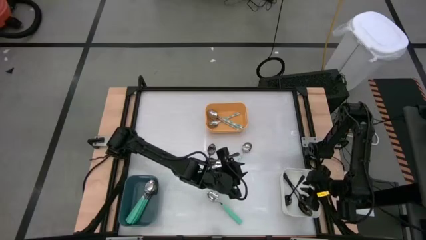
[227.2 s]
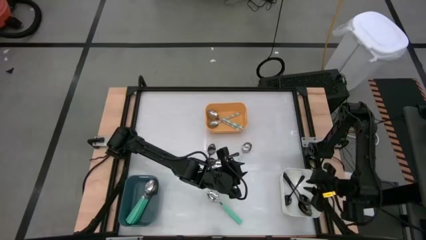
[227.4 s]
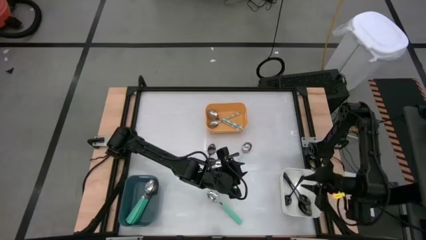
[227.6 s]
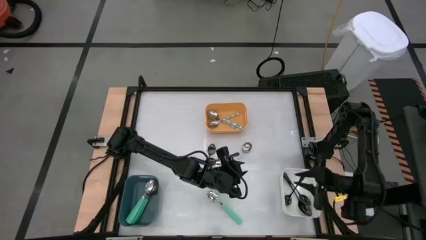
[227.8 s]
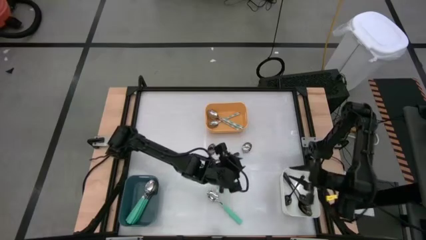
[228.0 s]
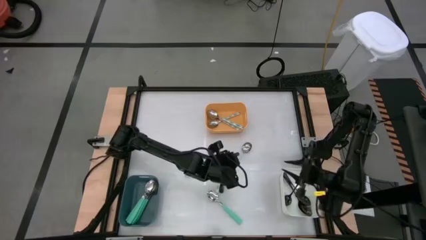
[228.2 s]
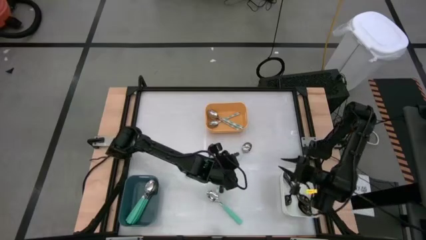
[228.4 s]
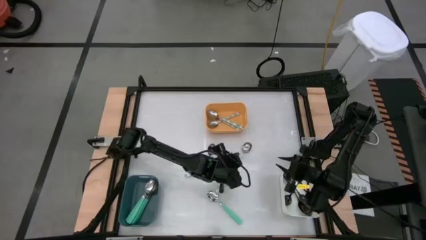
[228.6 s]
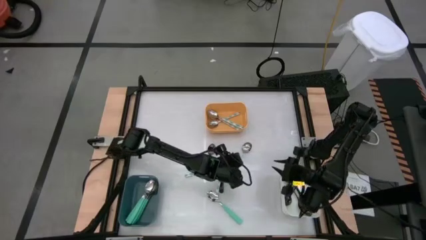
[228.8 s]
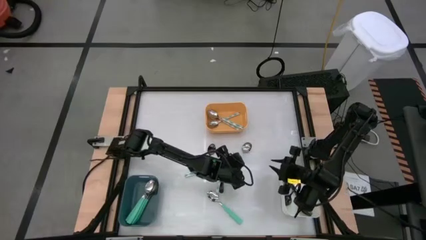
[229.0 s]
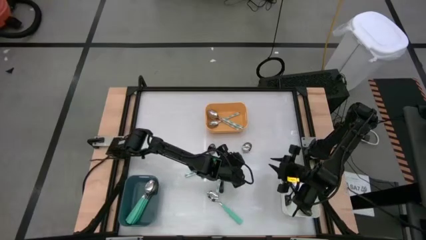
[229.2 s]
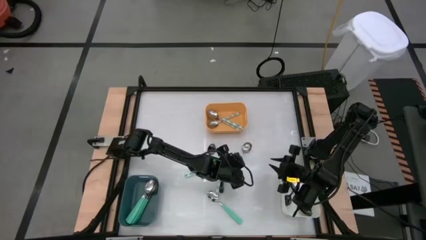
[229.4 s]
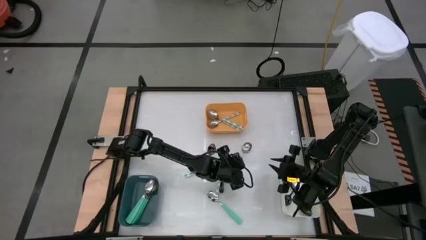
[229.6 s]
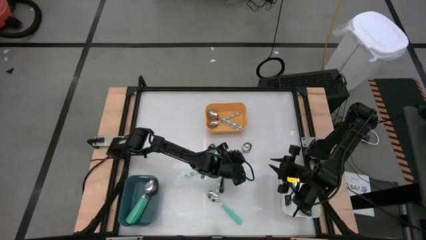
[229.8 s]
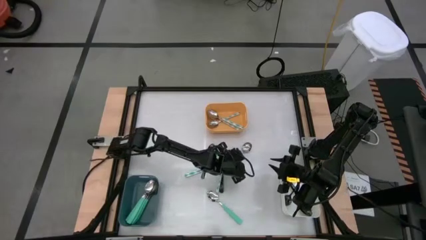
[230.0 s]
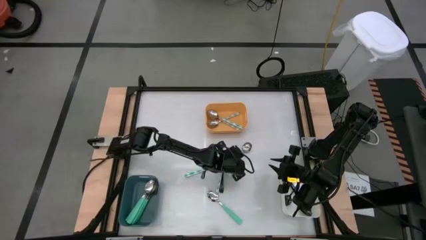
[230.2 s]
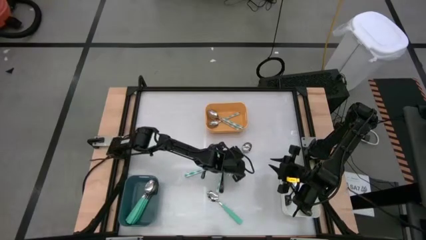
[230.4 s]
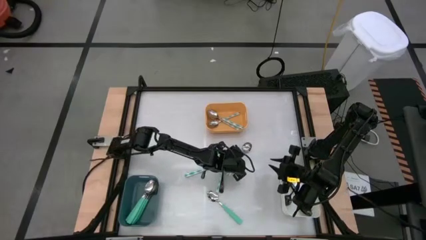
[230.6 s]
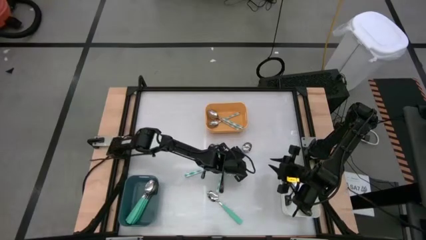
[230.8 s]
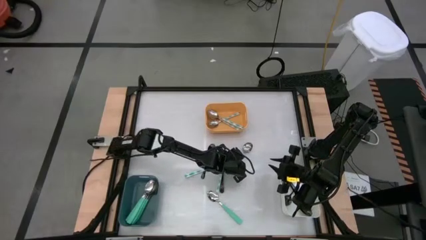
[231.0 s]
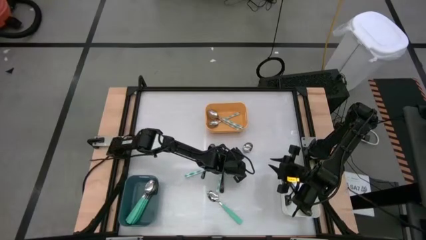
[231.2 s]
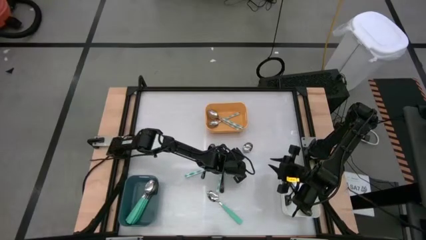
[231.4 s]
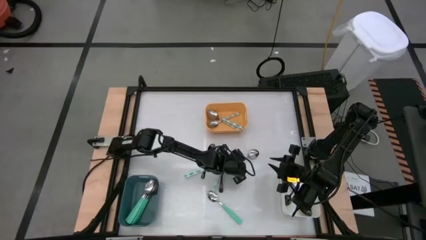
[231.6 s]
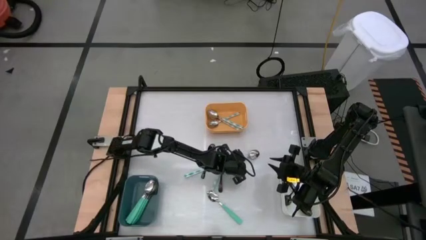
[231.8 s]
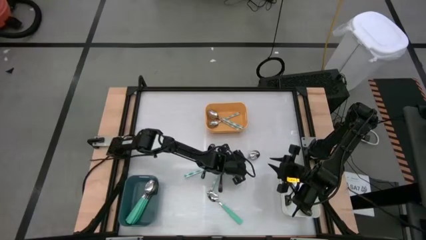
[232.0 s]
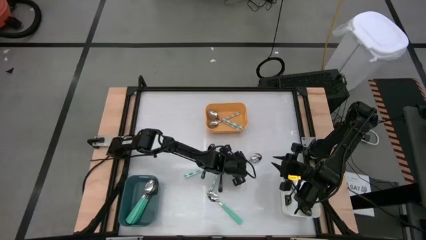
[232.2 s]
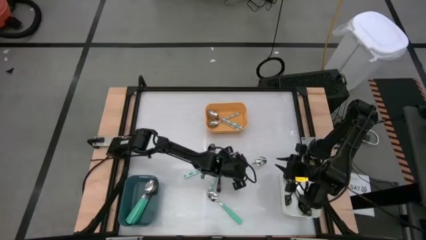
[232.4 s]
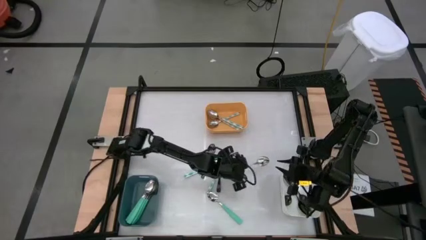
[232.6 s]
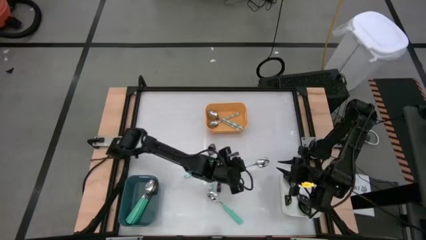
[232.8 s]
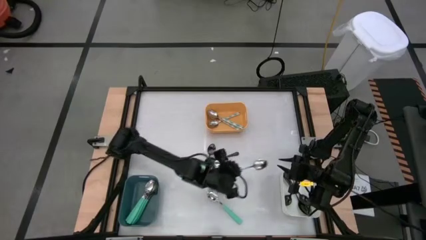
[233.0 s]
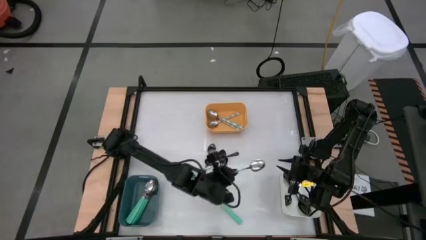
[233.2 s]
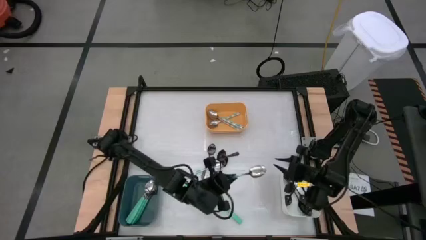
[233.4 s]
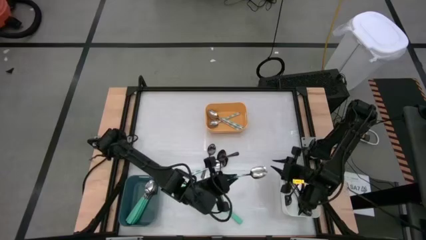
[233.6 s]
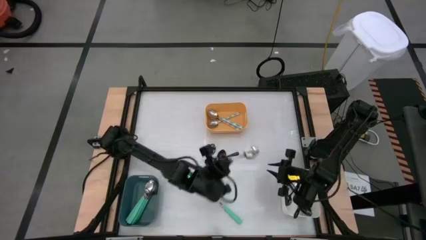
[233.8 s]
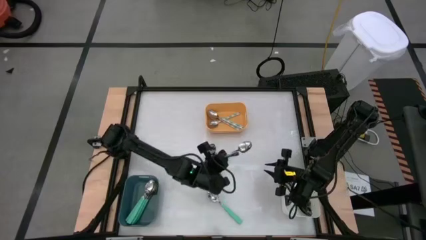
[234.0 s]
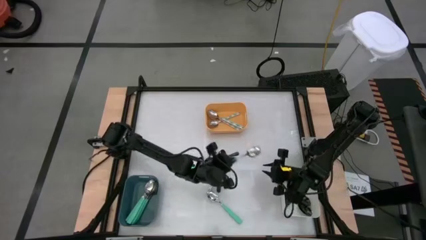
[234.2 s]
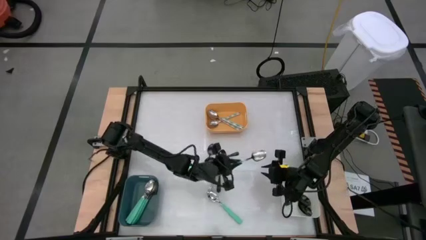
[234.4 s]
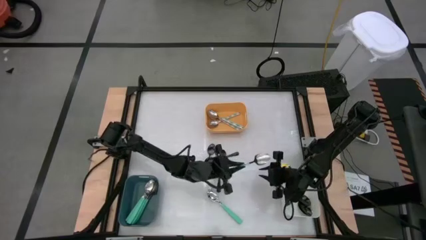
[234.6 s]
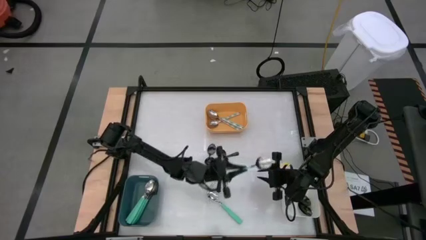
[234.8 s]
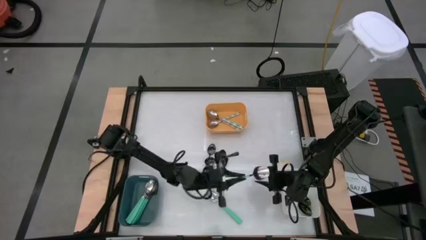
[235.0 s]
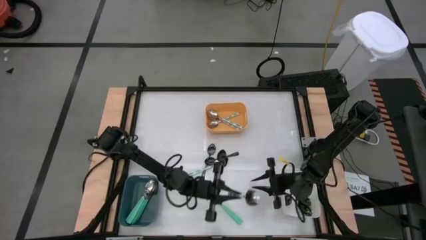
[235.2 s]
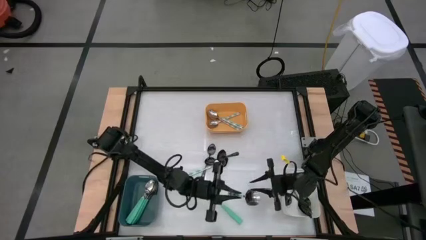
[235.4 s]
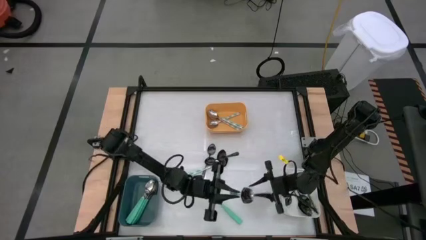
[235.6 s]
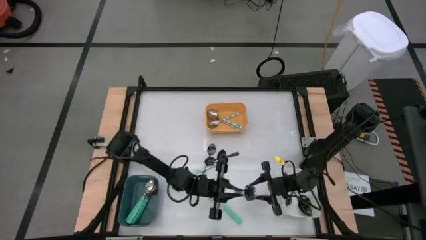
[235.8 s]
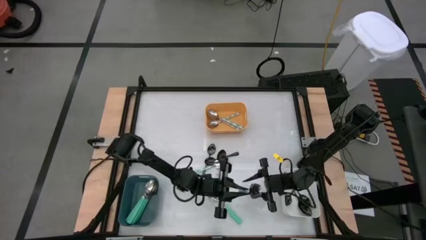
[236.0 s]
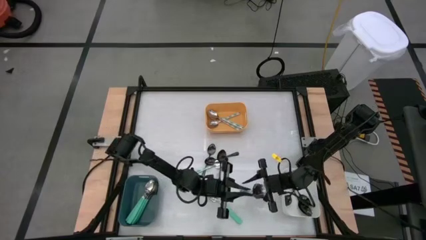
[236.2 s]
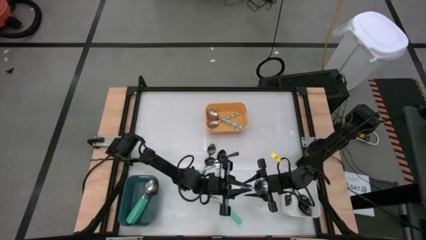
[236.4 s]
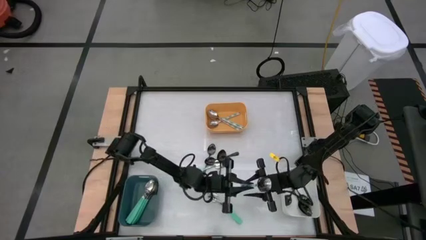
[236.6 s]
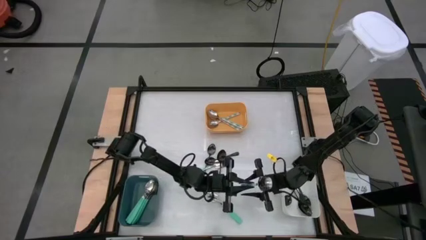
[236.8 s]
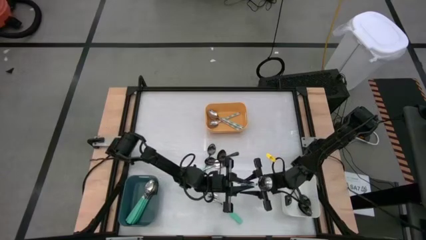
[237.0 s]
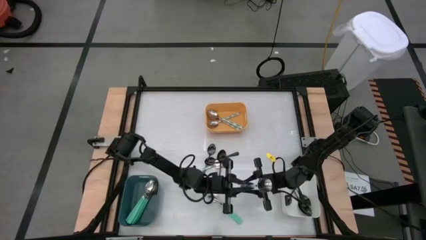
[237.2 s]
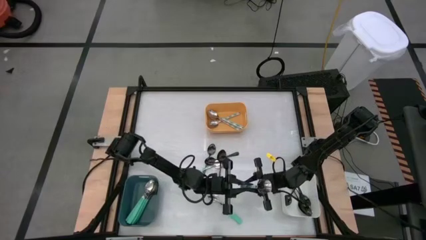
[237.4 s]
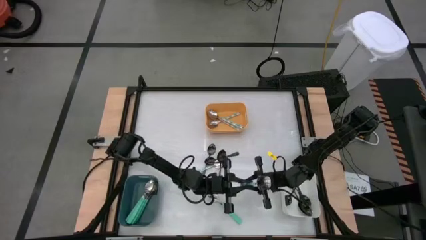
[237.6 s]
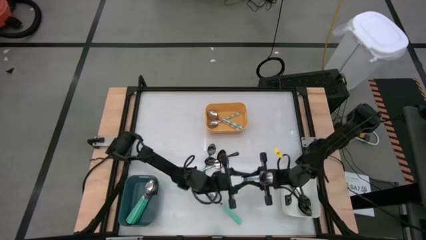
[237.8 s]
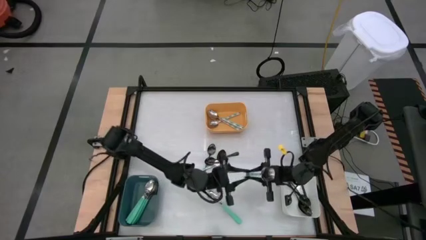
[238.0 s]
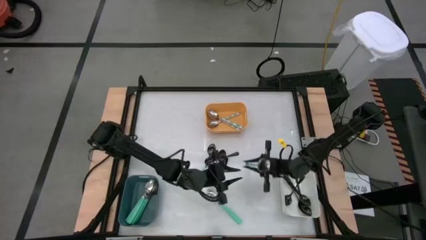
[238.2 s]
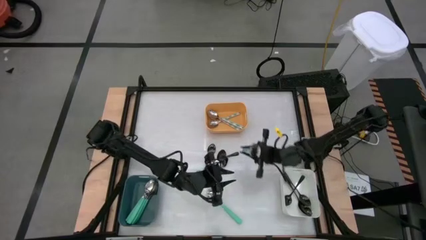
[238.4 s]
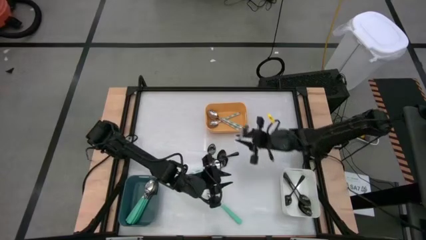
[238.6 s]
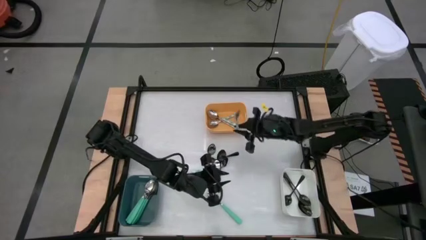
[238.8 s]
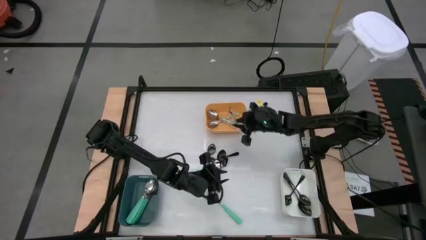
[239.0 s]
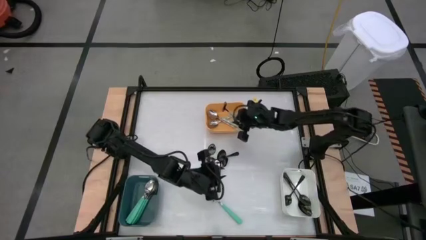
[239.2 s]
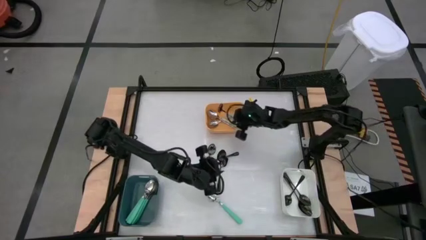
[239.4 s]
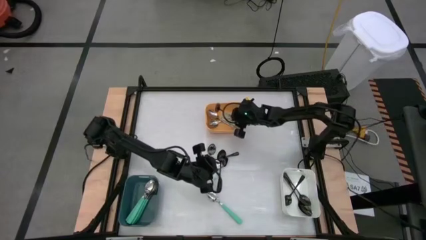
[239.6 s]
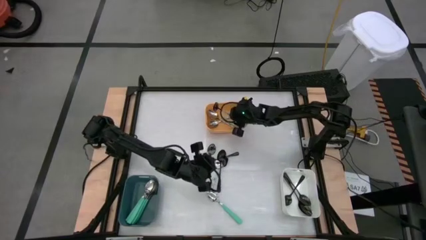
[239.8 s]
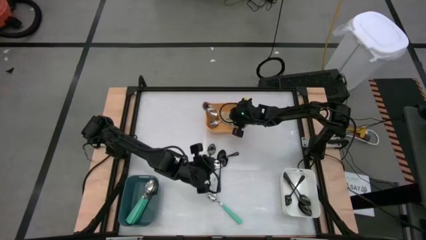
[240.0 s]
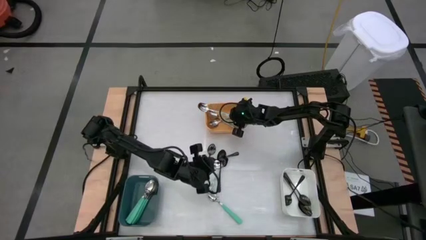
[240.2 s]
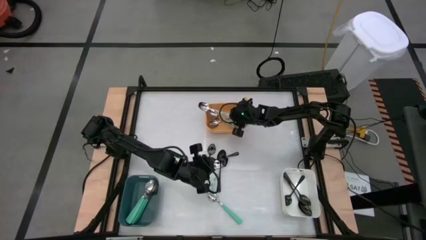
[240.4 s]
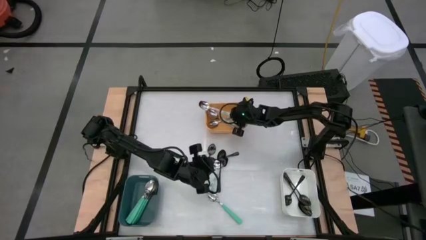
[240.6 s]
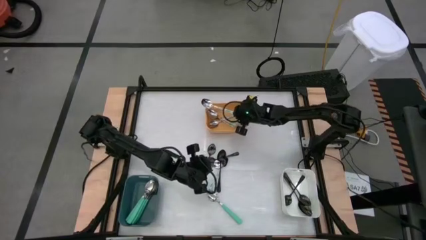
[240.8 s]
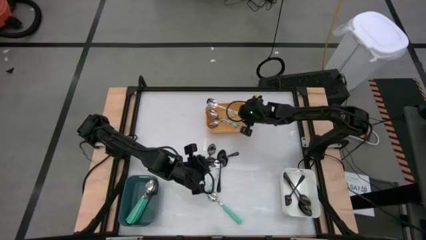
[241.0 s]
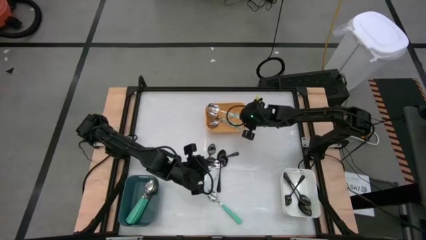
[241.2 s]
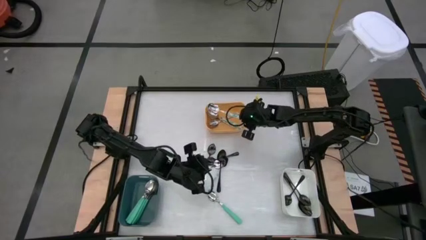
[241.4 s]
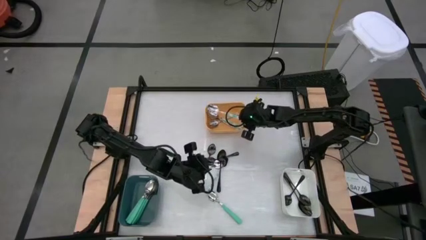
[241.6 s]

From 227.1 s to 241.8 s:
Task: Sort silverware by color (type)
Put the white patterned spoon into the yellow bin

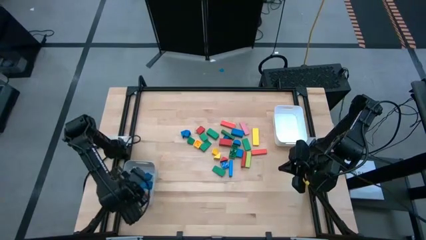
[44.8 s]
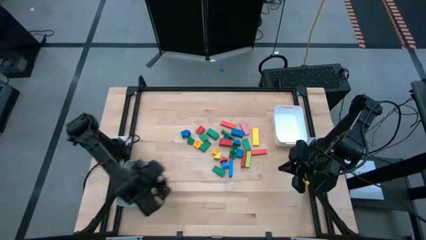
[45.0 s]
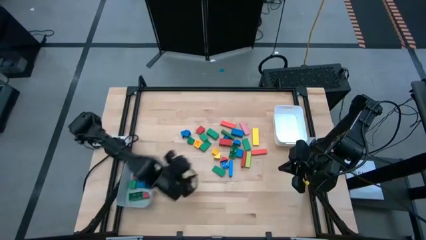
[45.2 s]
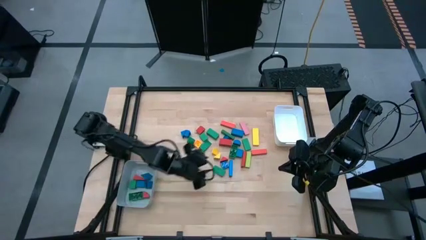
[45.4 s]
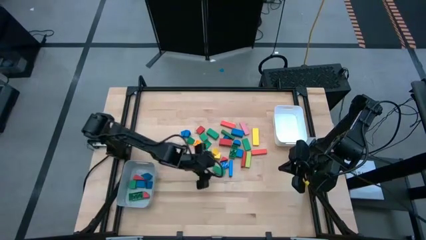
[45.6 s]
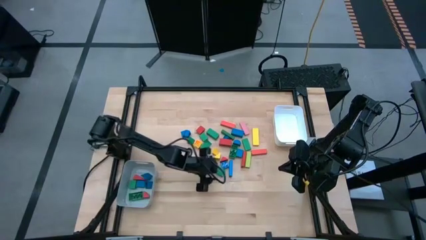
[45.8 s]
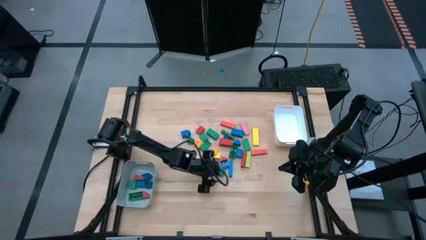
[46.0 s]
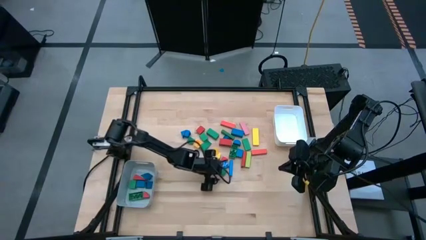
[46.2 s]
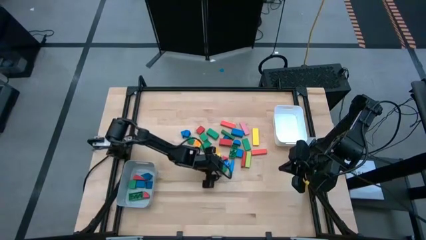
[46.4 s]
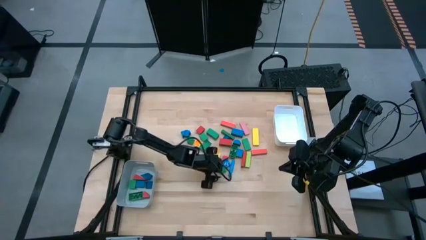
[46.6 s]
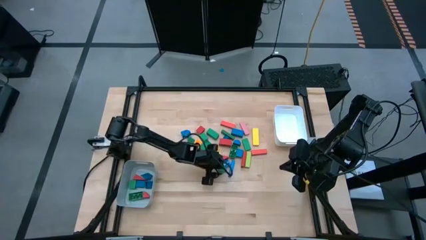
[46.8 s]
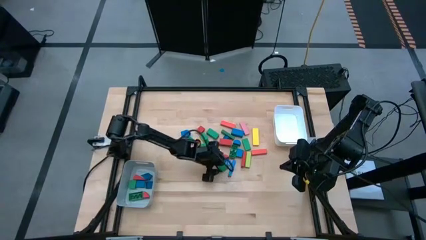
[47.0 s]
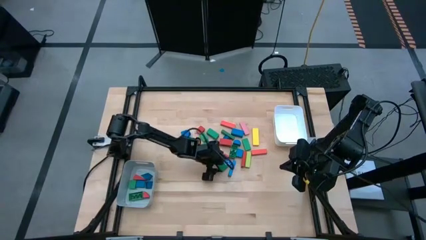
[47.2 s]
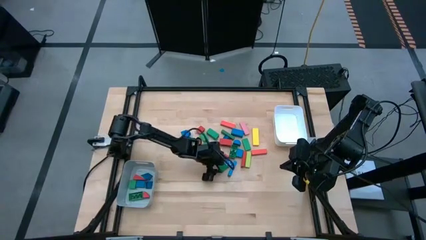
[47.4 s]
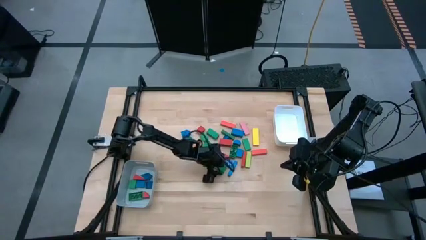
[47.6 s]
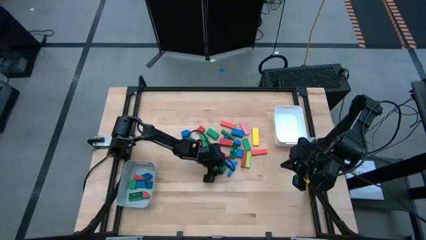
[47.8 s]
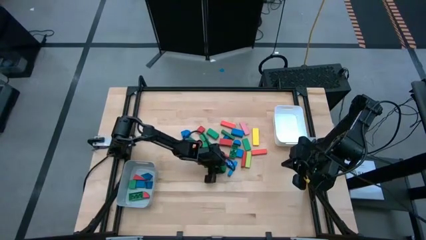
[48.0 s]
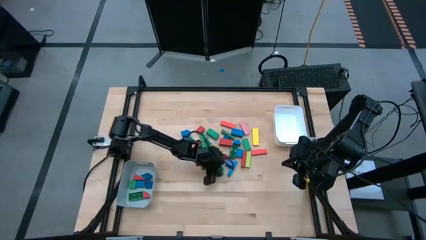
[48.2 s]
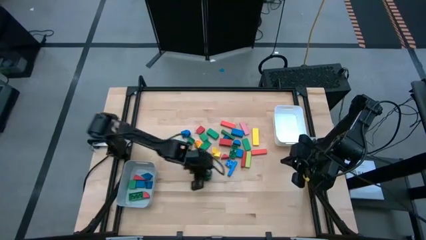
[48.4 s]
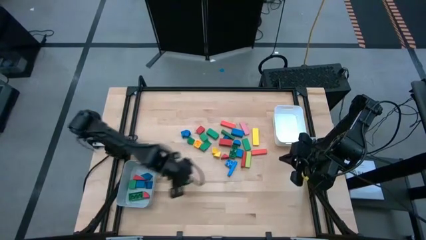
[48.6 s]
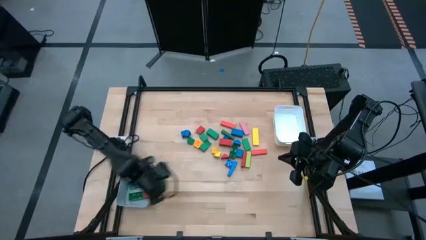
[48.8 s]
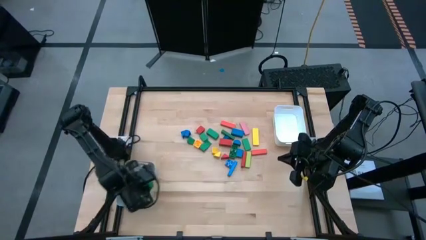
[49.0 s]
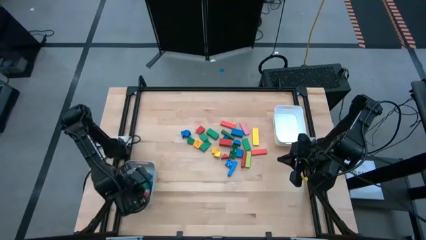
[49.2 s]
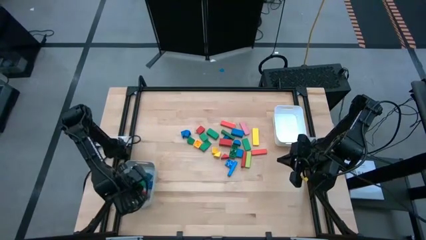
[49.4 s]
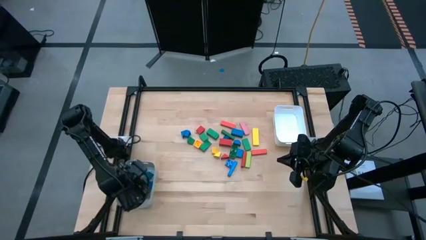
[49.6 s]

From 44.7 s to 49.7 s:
Task: Sort blocks by size
Put the green triangle block into the gray bin
